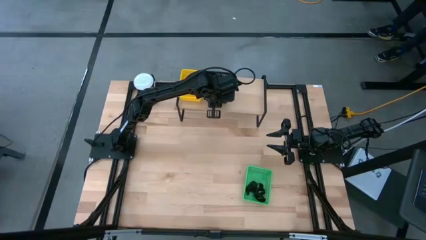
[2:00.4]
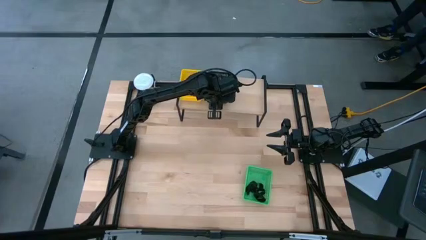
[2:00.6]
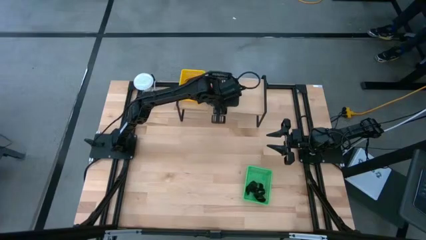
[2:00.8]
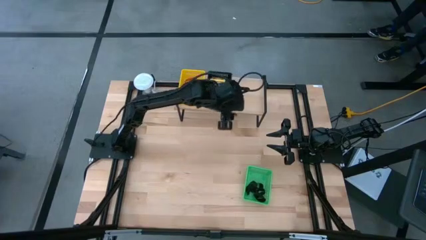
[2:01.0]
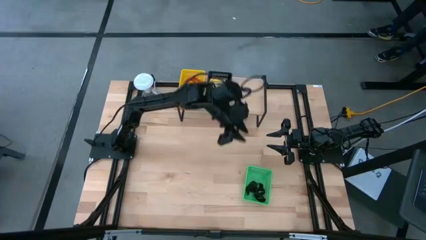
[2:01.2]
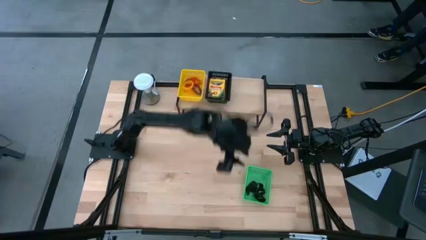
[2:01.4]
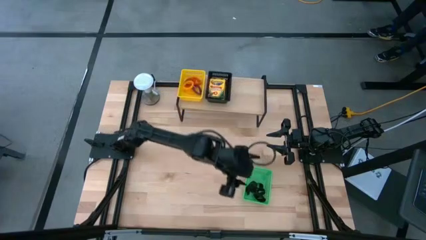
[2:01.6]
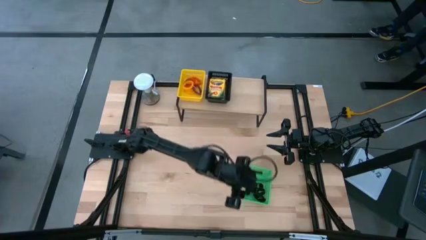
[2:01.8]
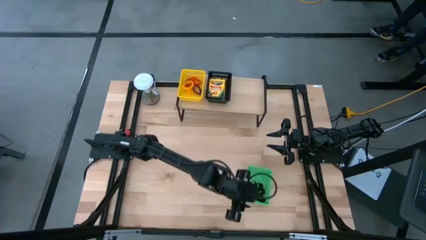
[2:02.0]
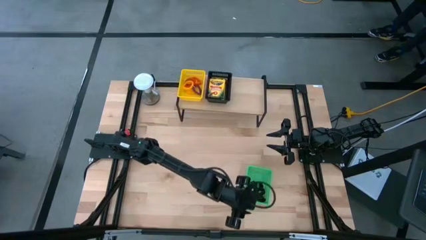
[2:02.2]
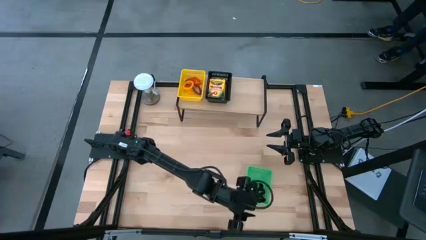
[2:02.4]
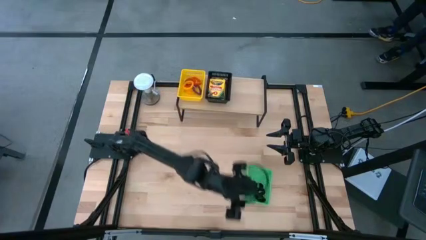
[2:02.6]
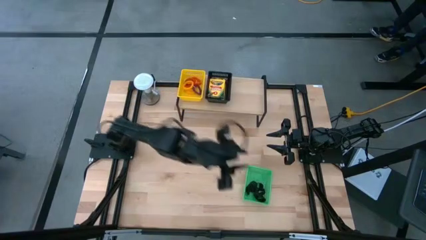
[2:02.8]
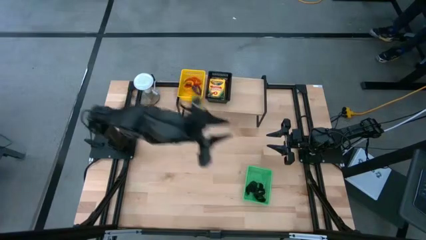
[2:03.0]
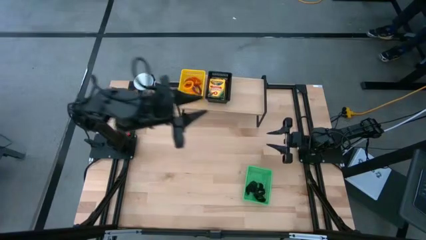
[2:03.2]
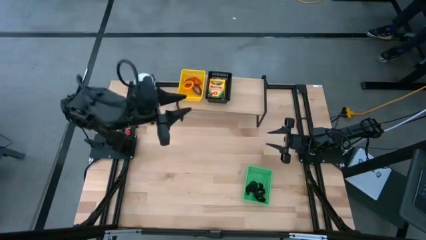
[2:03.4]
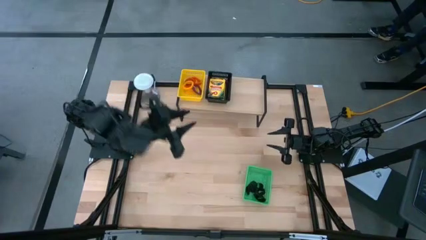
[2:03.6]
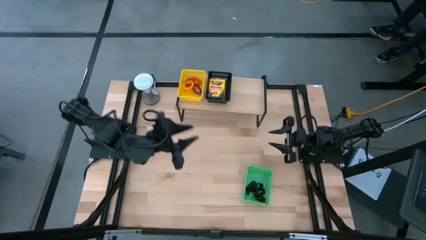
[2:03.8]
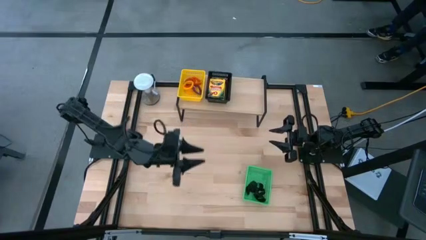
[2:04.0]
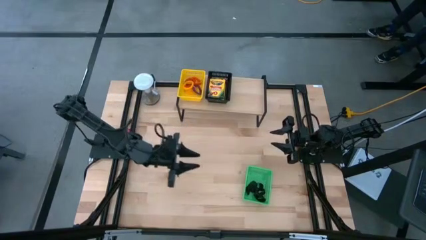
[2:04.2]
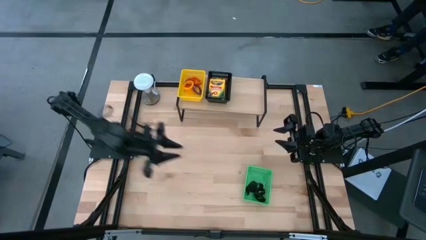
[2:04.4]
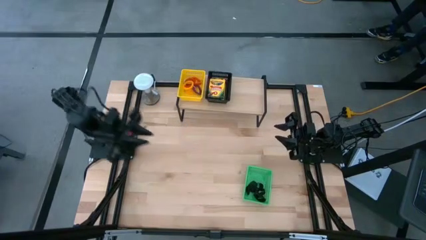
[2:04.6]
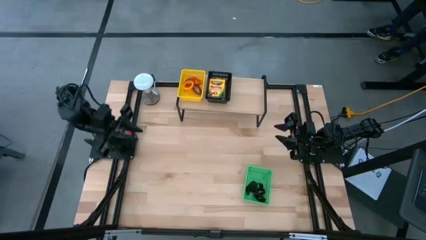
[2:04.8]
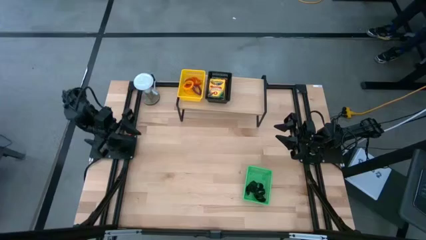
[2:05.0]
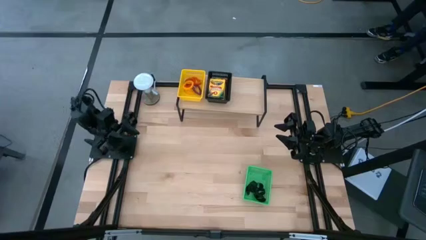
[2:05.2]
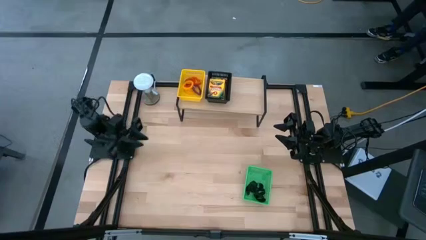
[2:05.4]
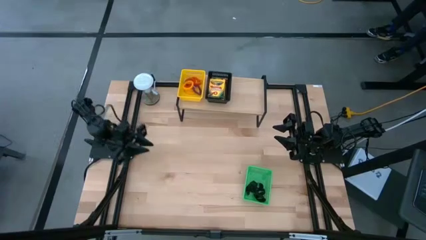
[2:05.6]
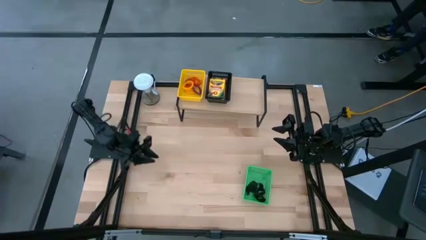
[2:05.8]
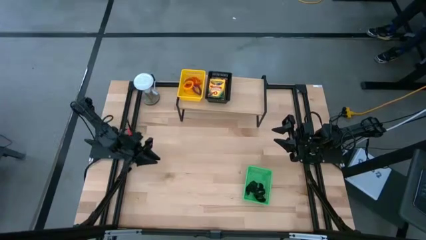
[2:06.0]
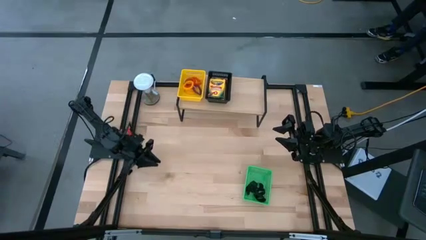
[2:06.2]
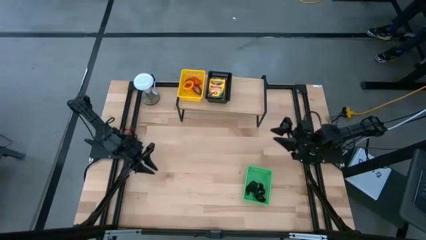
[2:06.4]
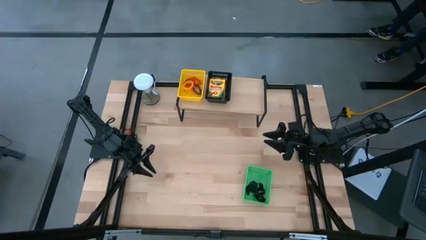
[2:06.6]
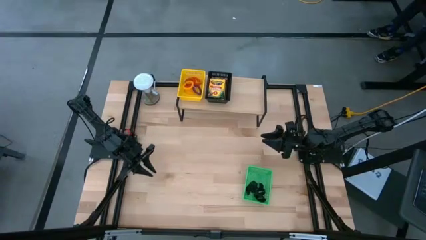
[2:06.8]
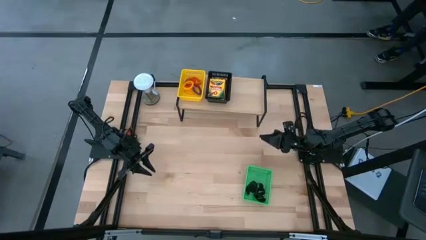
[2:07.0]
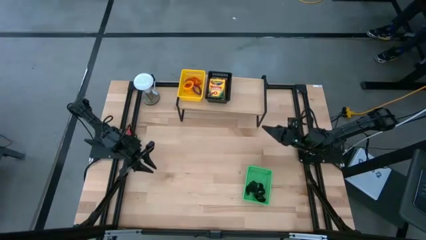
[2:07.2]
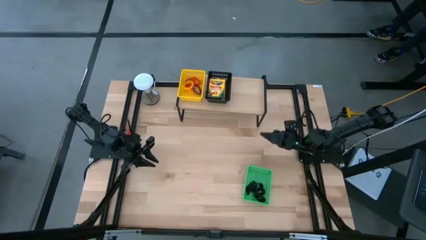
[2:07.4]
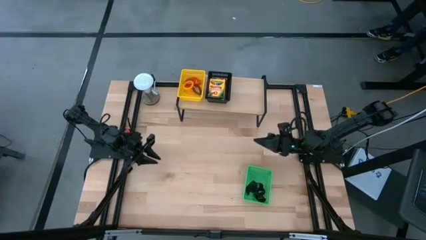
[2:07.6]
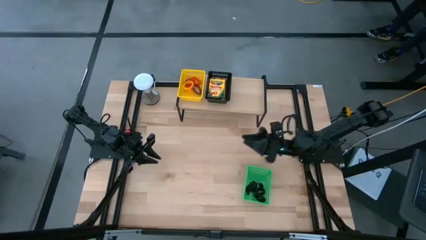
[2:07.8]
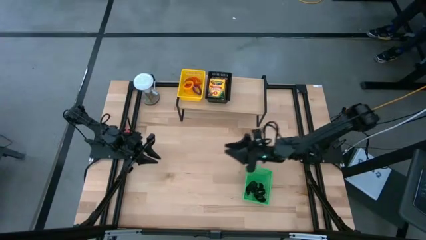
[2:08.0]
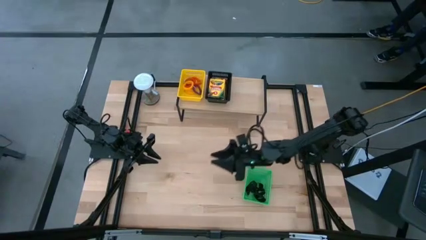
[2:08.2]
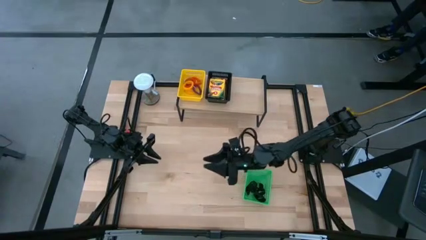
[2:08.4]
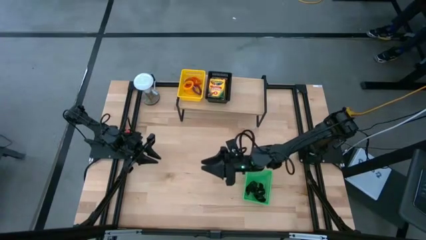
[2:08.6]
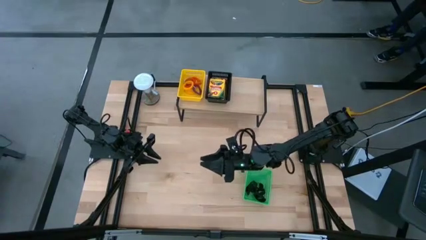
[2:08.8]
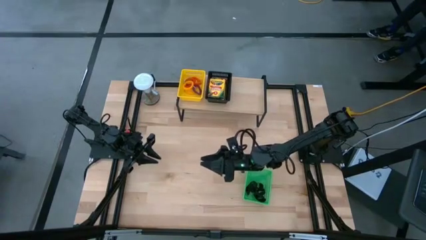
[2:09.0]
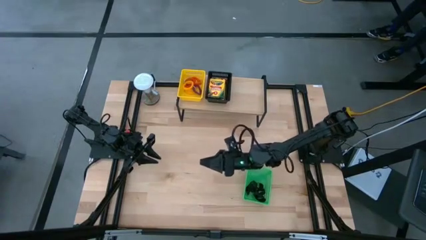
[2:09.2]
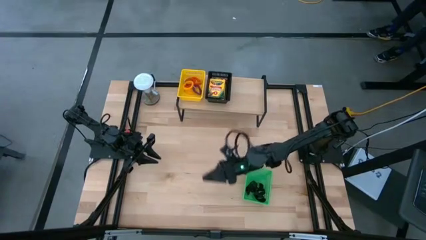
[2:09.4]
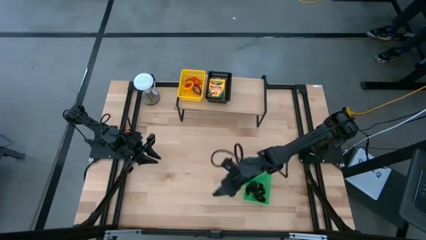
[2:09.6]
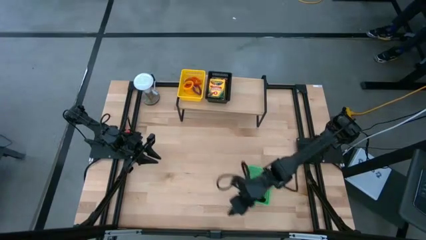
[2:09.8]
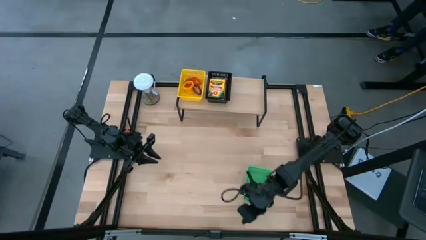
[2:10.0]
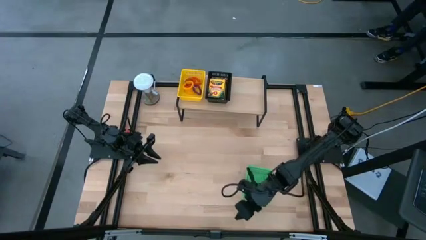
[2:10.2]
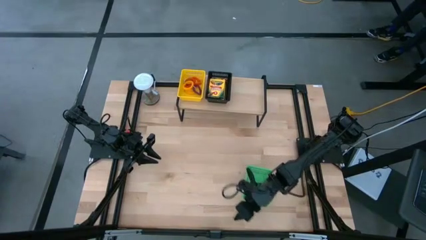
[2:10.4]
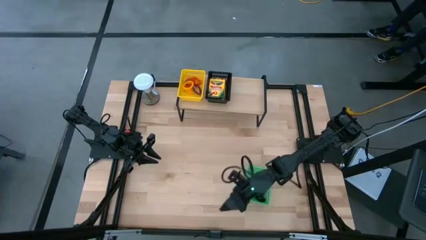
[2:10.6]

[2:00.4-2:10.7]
Task: Pick & Place Office Desk Supplies
Put the green bin with rubber bands on the shelf

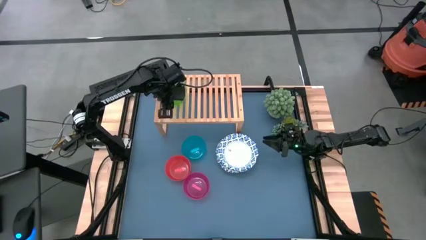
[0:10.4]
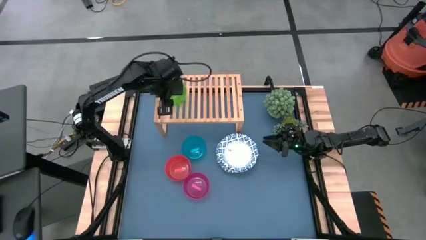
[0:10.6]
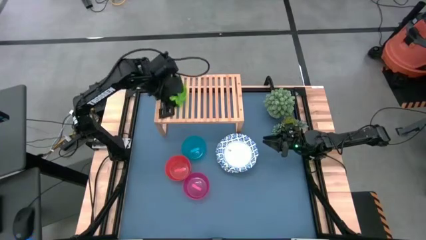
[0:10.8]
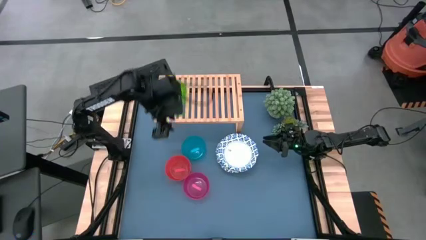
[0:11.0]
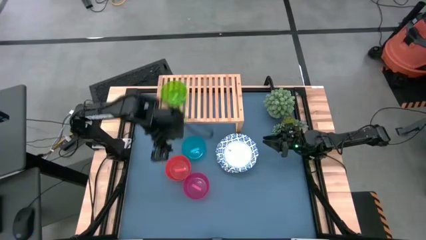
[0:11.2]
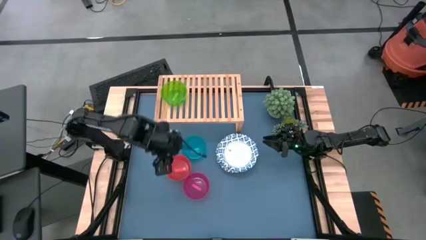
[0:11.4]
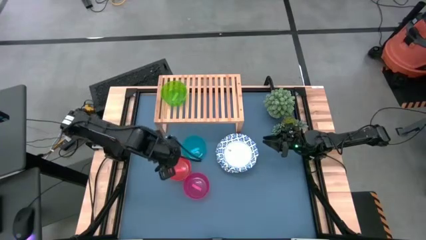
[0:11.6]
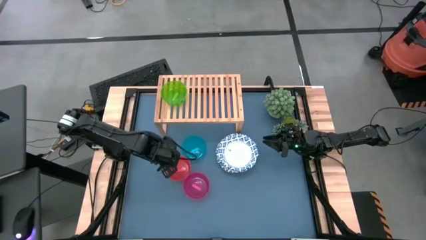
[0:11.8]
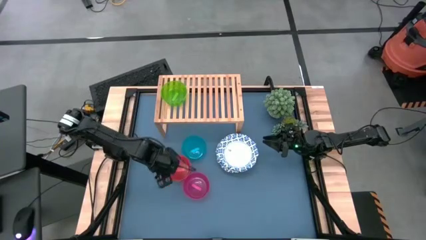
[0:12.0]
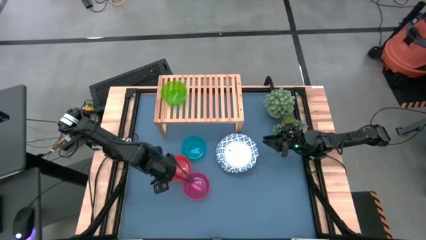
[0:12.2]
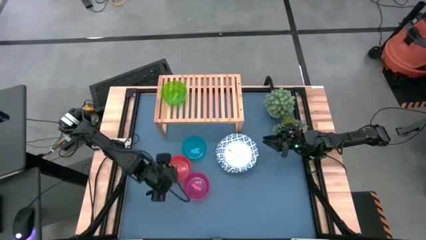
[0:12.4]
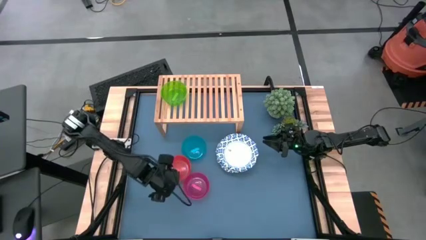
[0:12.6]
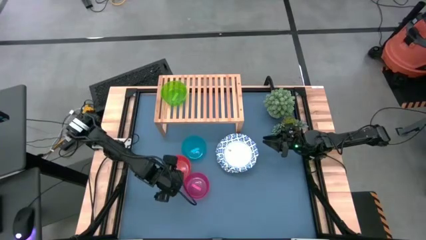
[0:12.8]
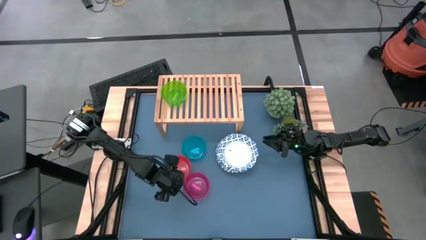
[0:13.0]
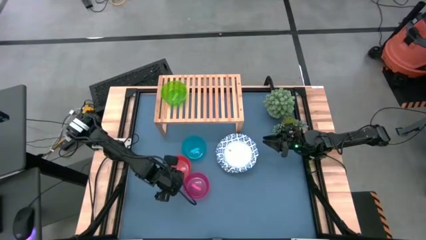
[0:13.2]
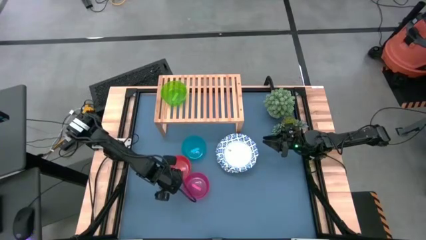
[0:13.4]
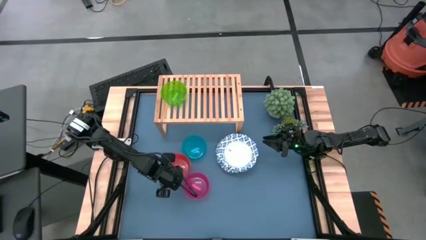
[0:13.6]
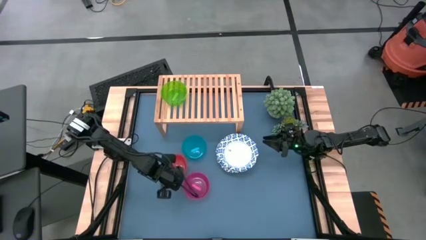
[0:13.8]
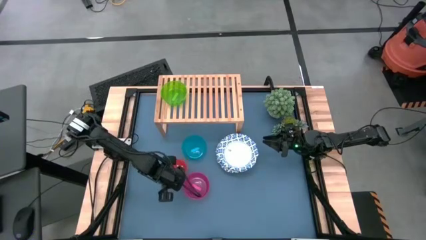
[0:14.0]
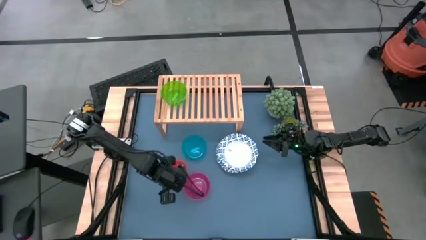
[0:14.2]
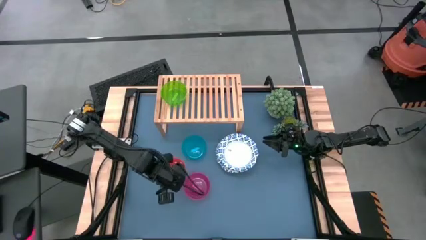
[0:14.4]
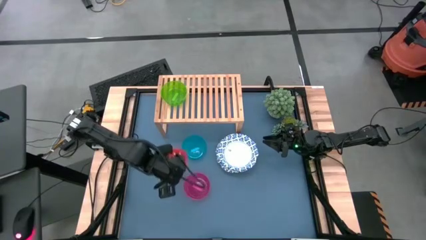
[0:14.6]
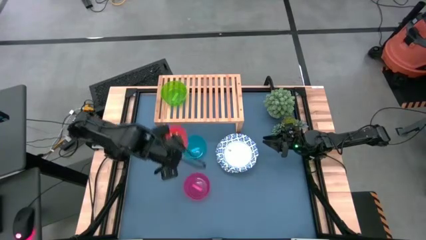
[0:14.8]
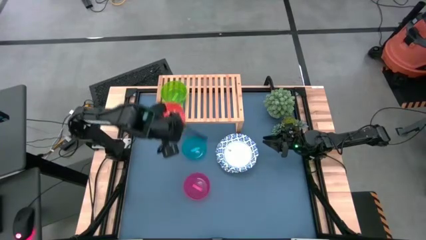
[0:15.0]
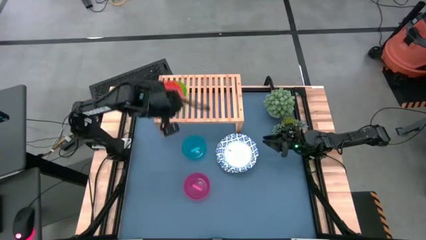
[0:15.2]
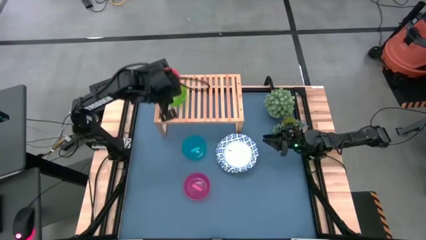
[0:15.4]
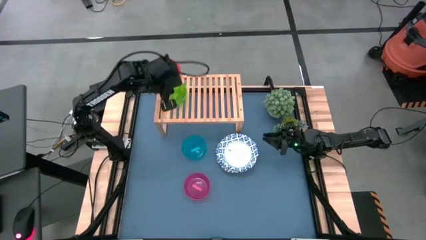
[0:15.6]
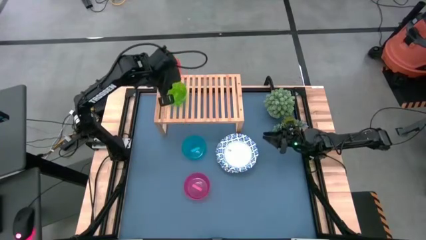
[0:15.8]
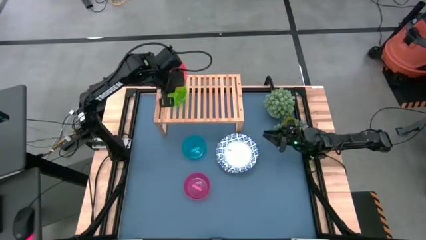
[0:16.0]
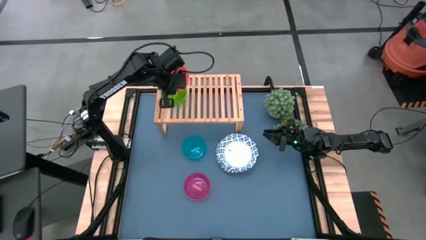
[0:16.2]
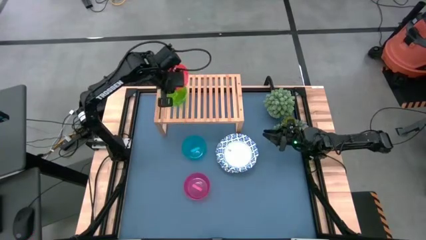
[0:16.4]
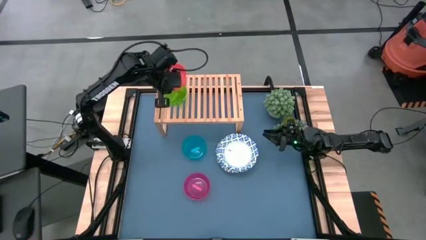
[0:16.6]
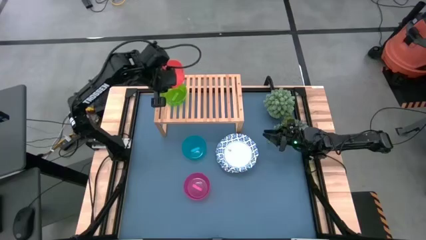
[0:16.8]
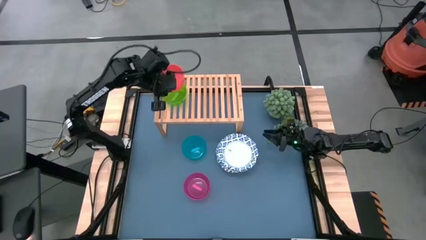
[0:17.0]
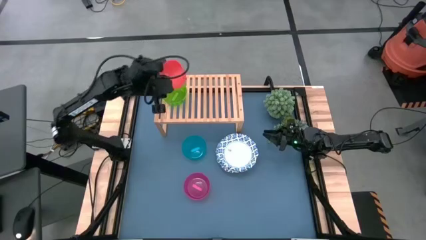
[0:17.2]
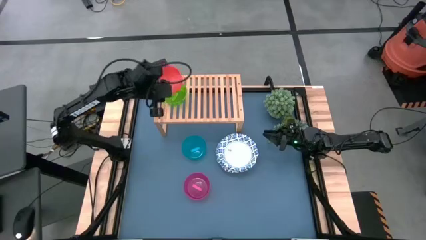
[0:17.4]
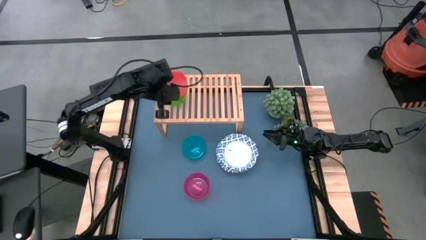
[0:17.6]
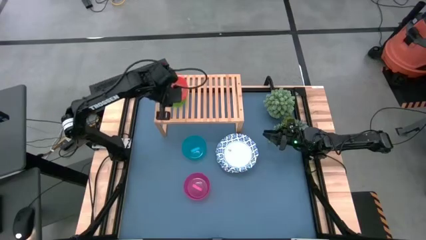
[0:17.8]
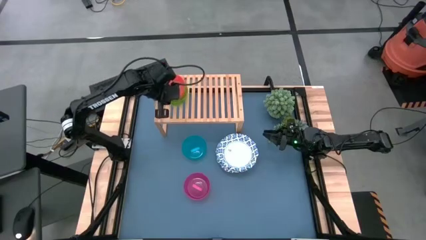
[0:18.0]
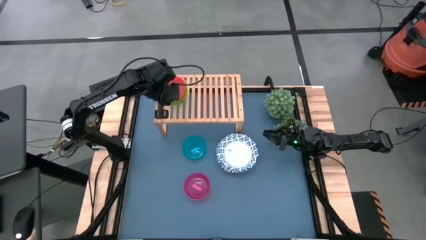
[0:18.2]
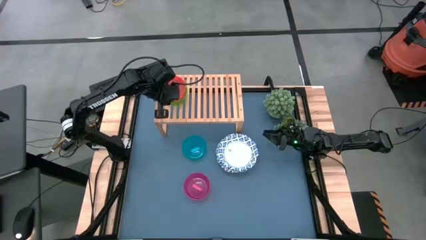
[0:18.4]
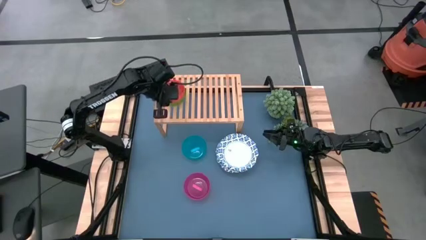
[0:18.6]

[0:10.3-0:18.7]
Task: Place and stack bowls onto a shelf
Stack the orange bowl on top of the green bowl on the shelf
